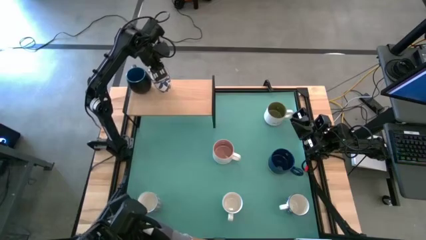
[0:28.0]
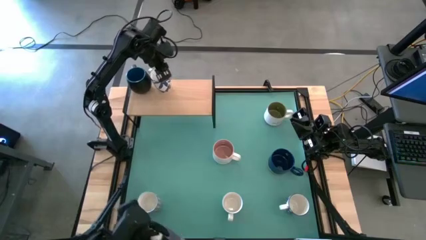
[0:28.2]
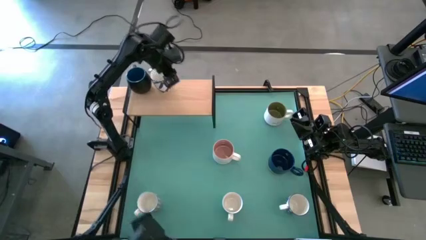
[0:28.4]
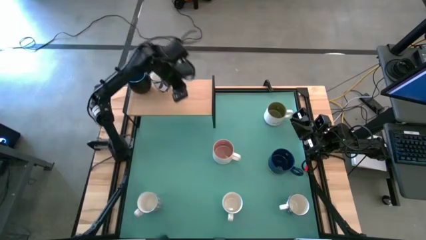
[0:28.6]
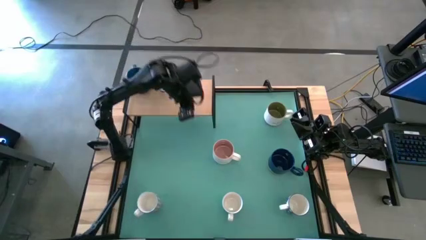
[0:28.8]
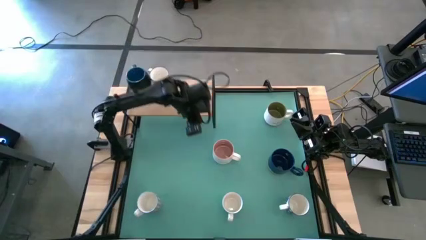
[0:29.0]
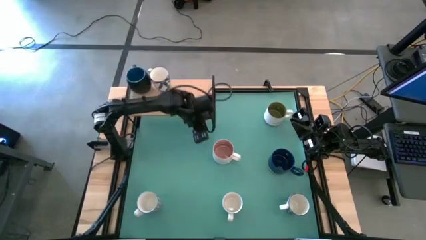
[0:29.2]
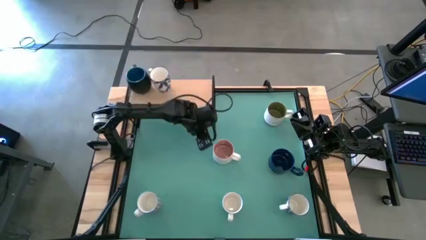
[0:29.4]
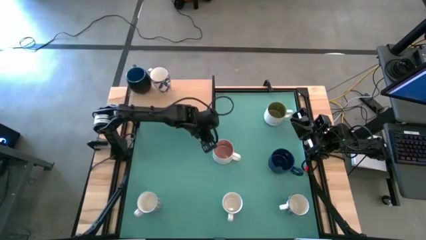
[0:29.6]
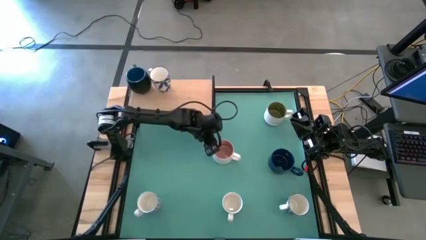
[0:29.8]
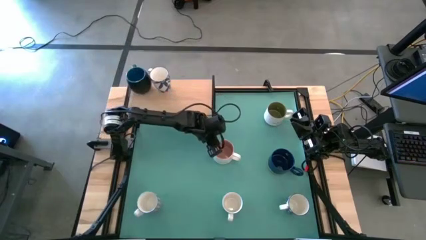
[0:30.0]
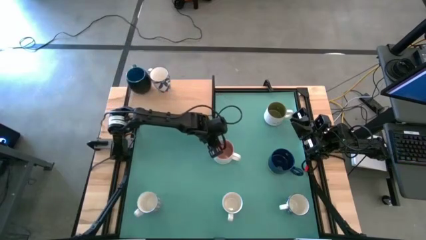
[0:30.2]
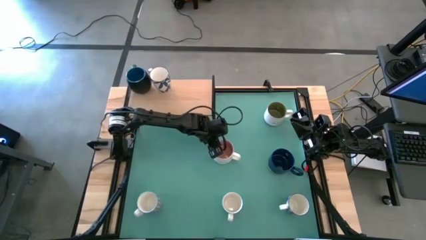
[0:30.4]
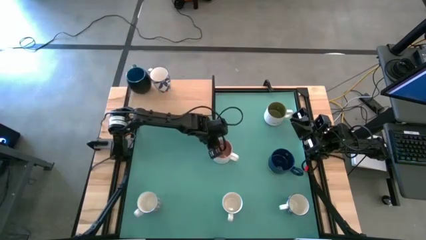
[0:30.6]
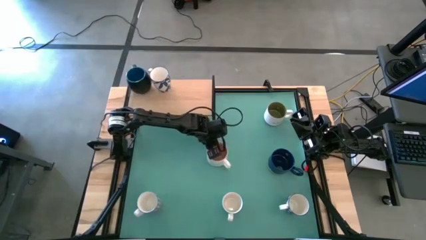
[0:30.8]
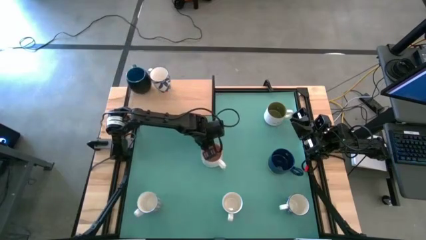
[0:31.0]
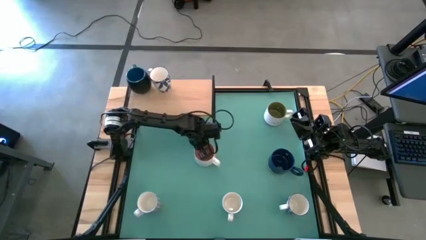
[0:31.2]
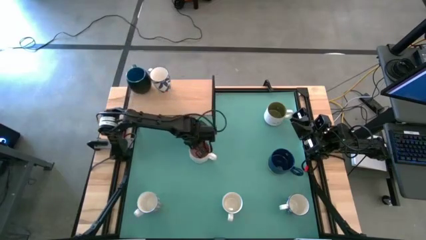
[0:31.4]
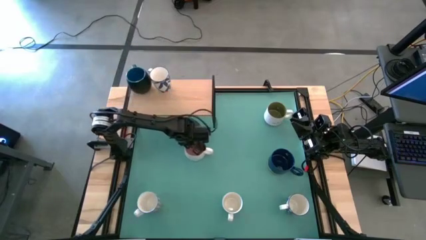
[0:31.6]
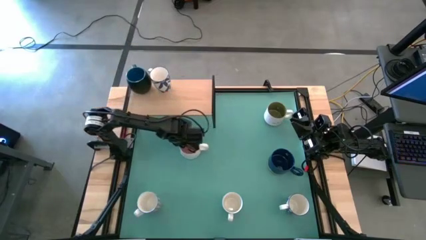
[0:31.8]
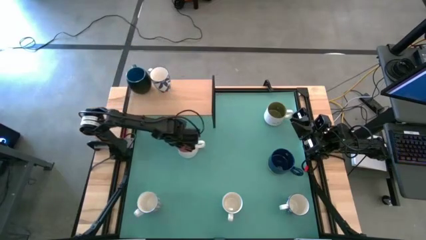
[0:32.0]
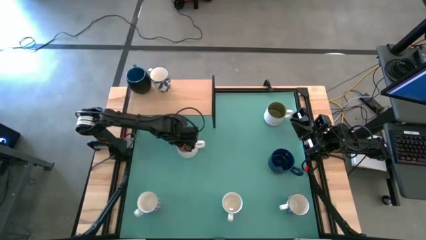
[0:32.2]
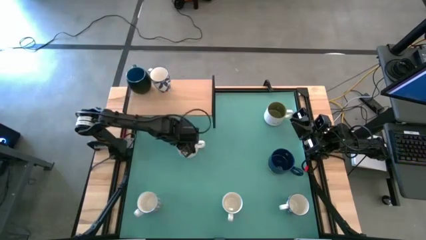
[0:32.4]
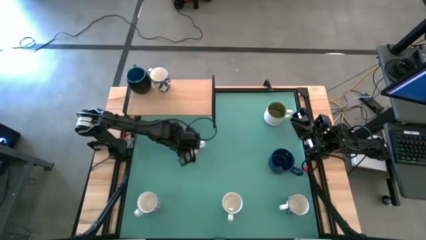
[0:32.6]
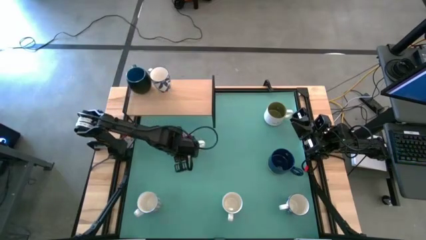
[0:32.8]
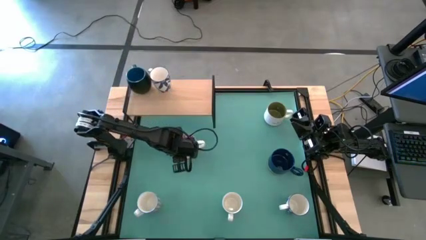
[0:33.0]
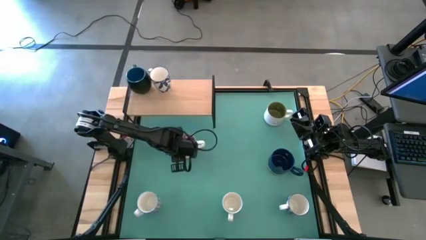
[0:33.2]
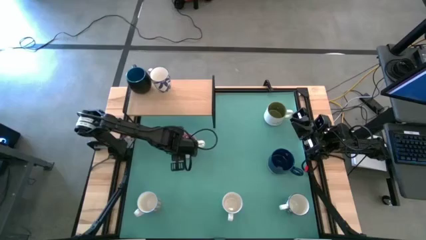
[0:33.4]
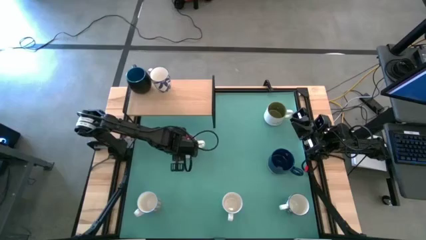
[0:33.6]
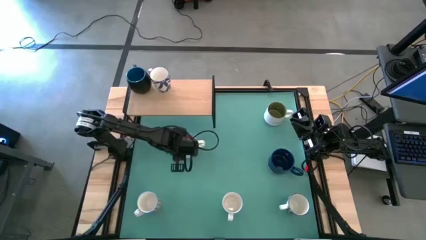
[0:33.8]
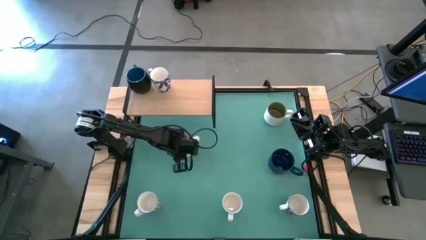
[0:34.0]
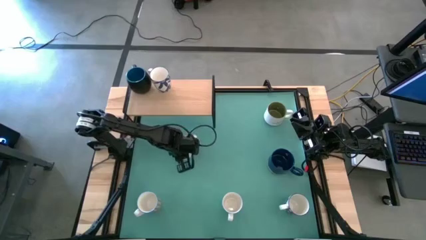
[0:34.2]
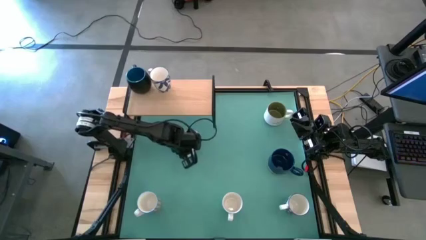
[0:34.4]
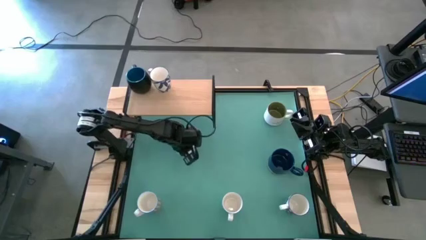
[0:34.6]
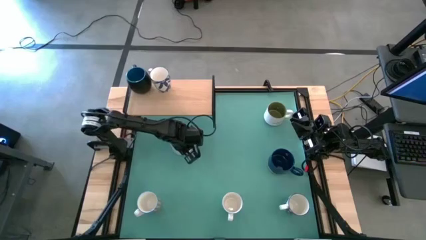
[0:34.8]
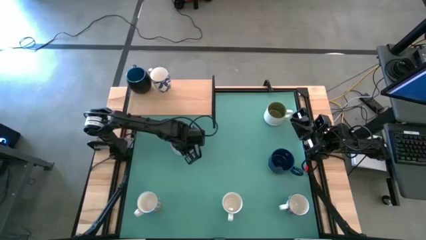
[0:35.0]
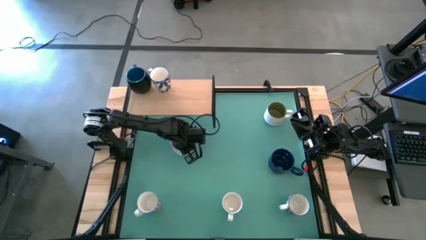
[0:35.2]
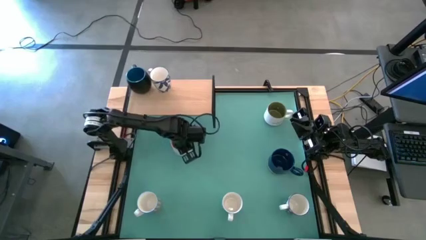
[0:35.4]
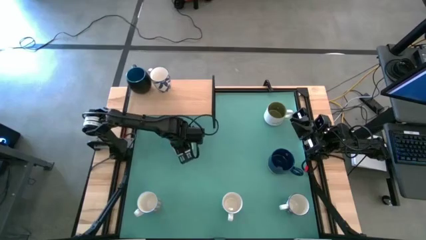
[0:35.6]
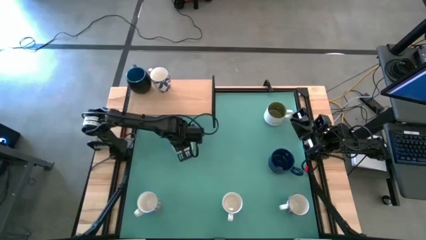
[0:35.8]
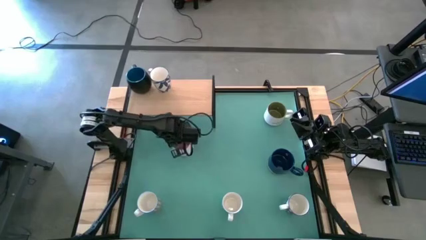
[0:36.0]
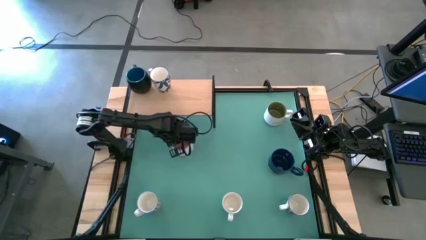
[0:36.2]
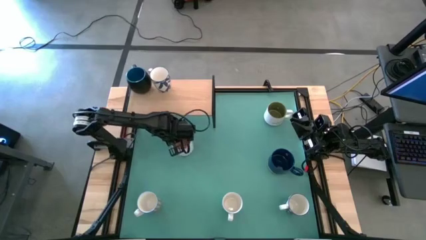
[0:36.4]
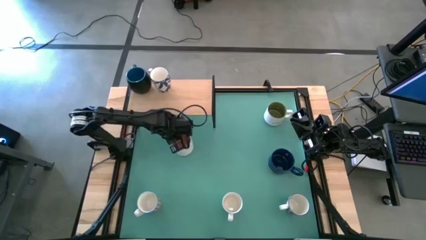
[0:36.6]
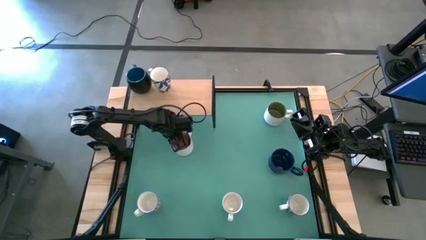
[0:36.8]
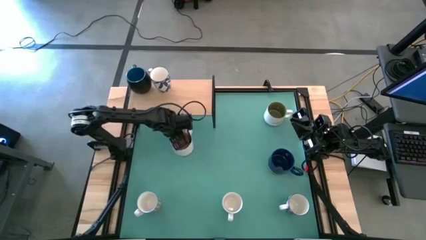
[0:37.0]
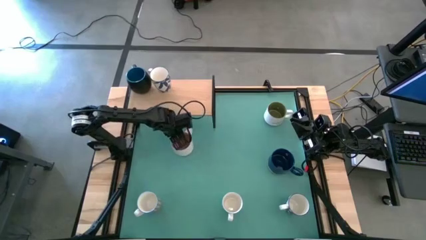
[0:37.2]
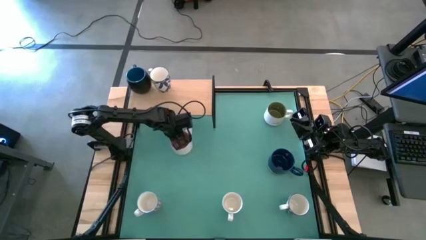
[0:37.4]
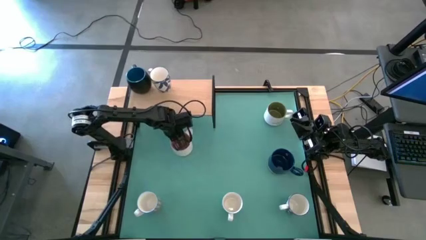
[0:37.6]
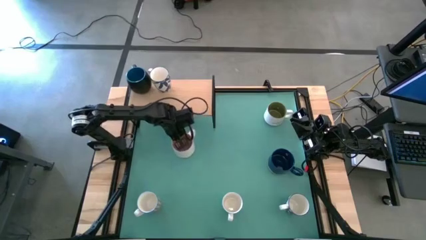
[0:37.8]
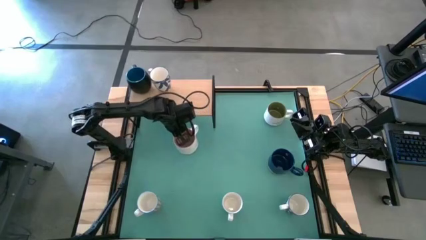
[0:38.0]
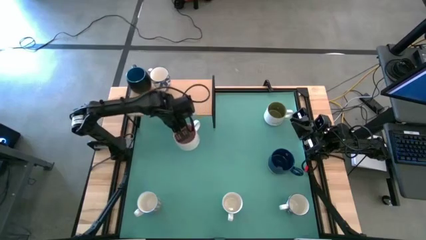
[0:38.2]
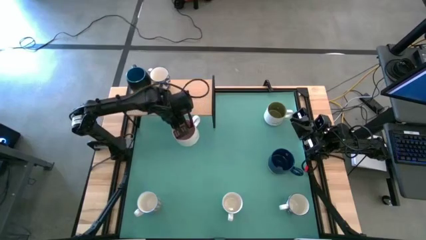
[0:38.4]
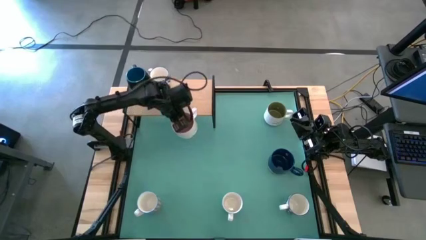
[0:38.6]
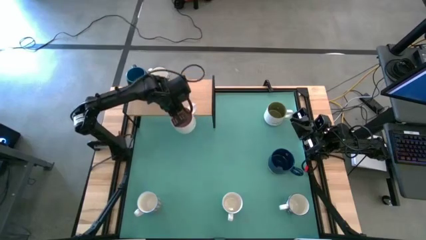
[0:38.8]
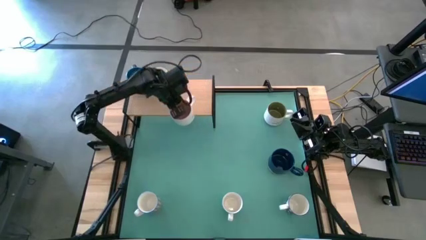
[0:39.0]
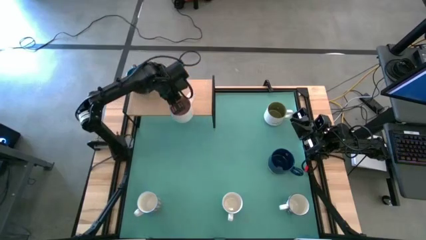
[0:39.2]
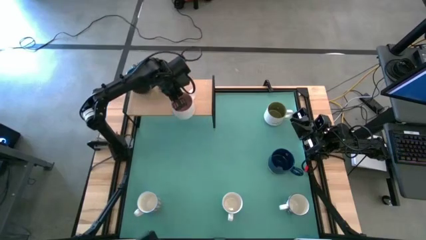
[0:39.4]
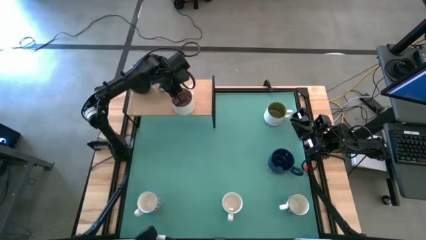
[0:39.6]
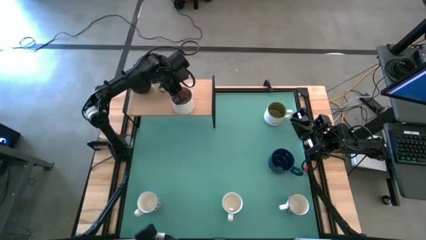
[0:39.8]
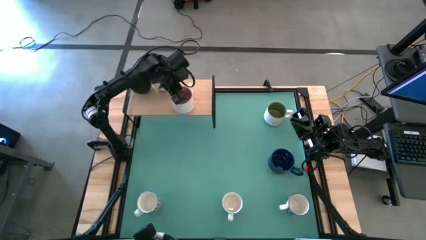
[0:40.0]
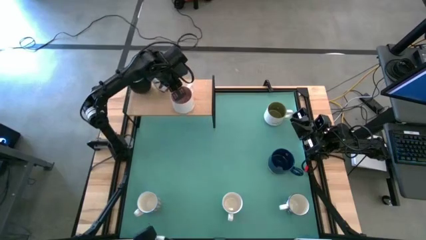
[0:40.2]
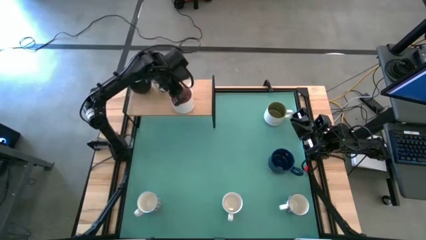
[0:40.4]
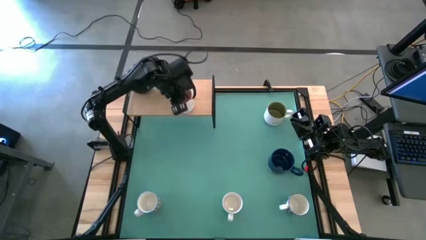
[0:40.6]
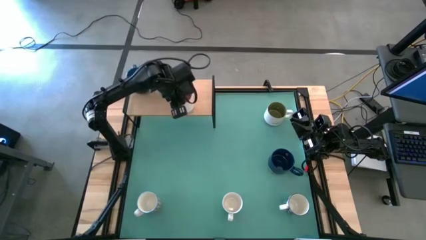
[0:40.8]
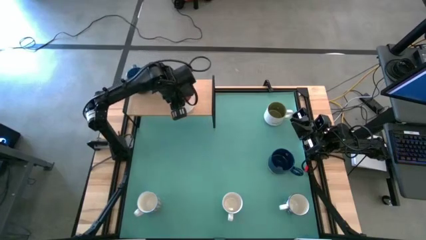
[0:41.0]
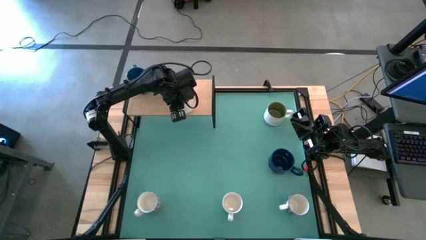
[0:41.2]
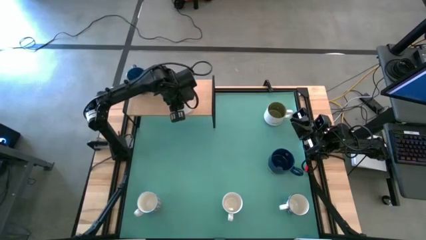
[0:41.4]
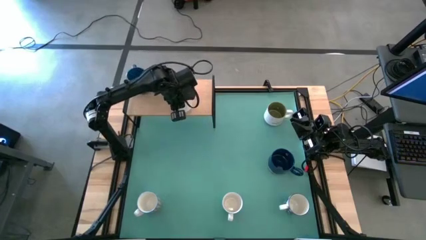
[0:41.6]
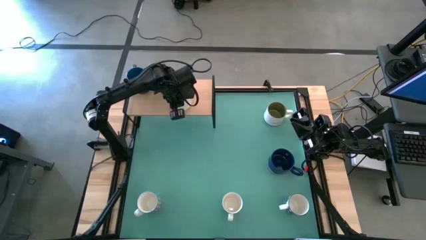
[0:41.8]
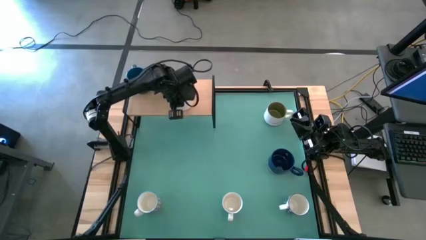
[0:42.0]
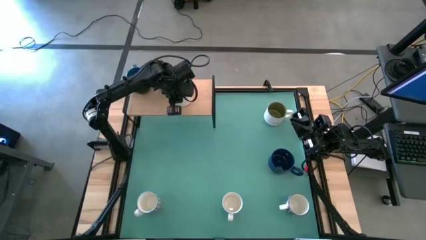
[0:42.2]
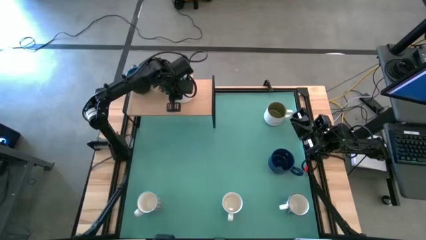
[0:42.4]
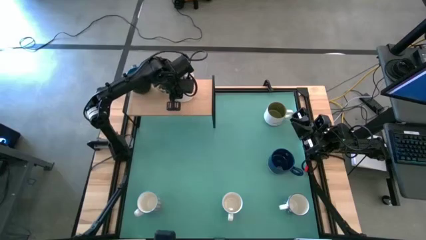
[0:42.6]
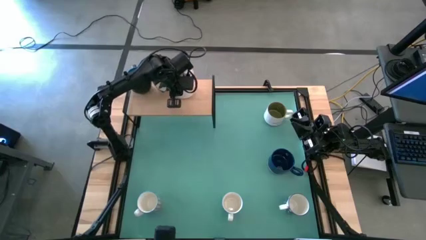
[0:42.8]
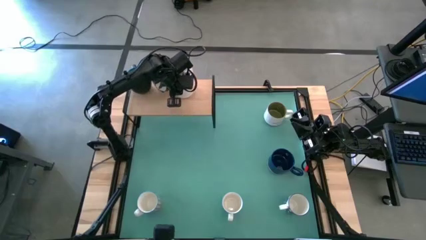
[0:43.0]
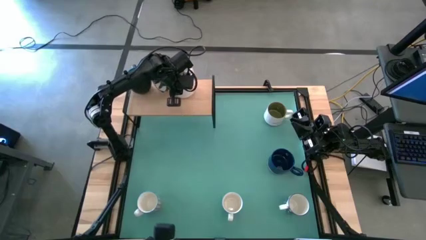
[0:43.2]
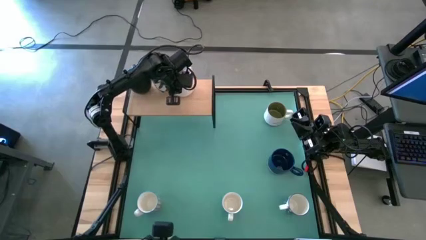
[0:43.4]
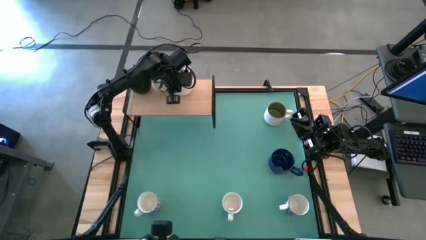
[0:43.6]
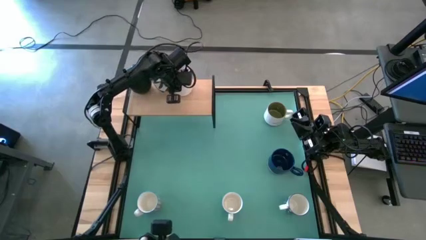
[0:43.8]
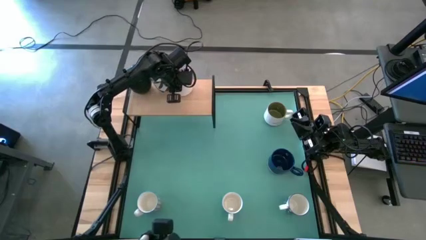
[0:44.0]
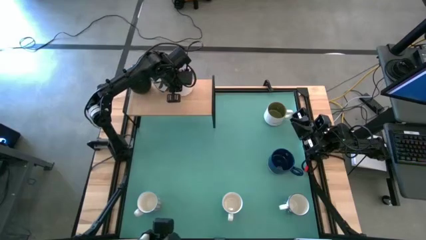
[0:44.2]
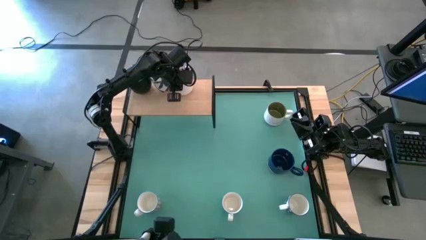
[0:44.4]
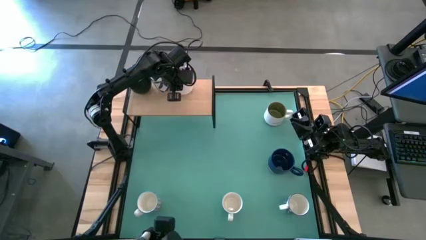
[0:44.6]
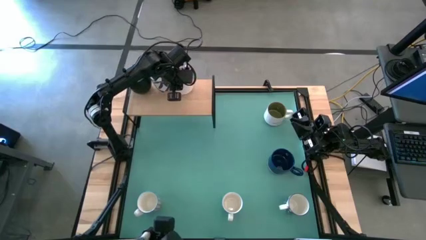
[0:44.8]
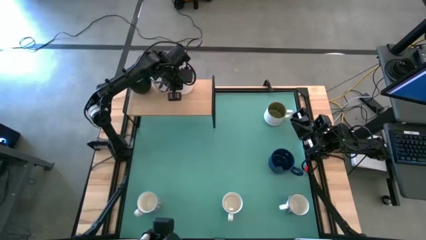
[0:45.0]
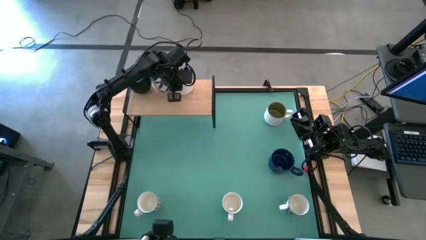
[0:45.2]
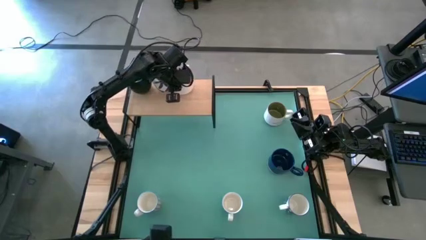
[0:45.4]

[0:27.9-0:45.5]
Task: Place coffee mugs
Put the white pink mug on the shelf
